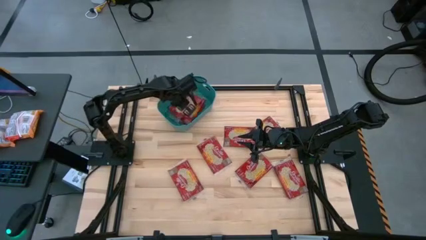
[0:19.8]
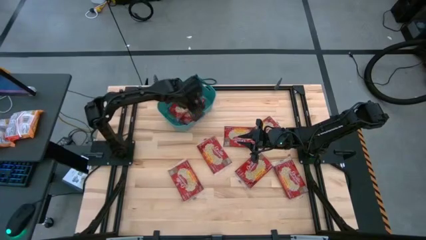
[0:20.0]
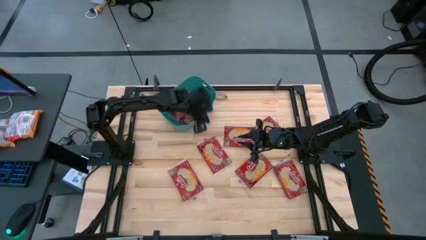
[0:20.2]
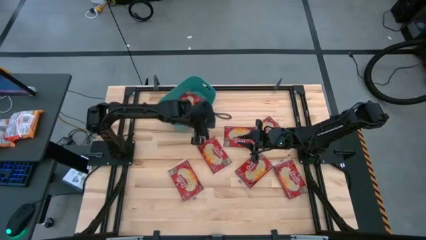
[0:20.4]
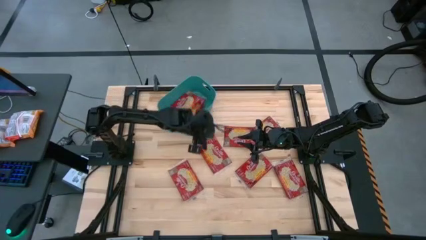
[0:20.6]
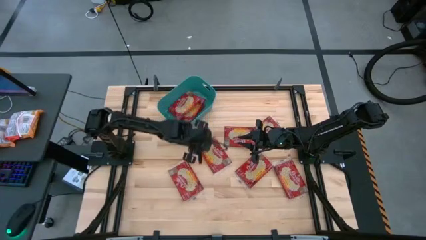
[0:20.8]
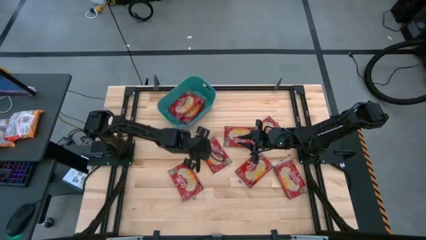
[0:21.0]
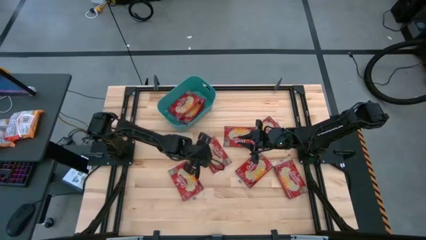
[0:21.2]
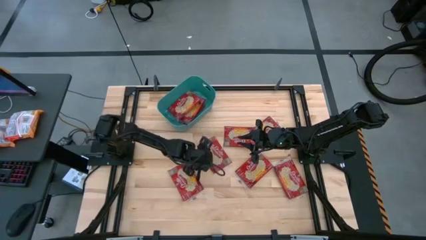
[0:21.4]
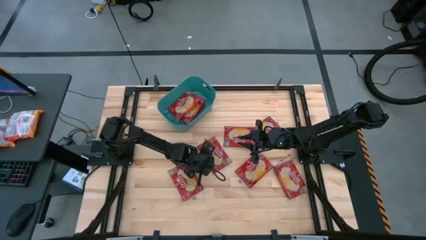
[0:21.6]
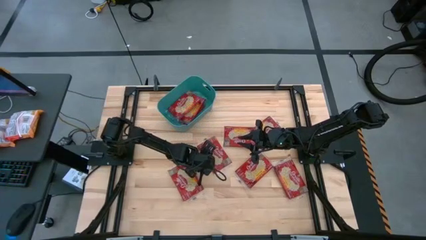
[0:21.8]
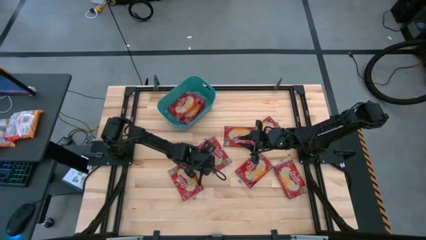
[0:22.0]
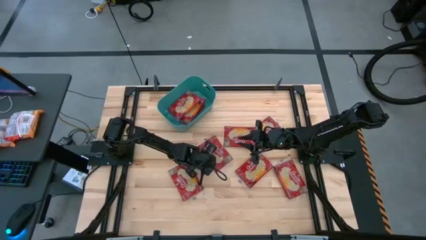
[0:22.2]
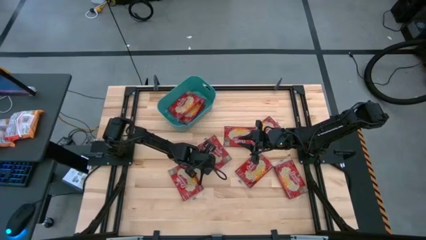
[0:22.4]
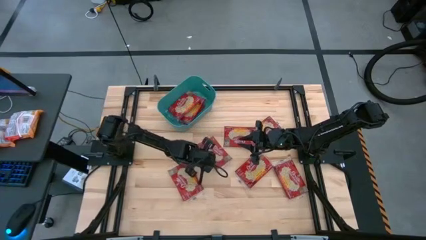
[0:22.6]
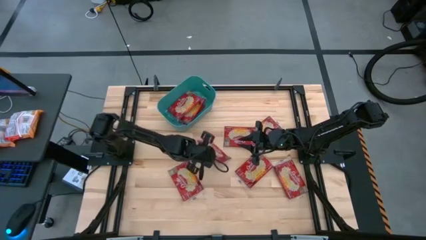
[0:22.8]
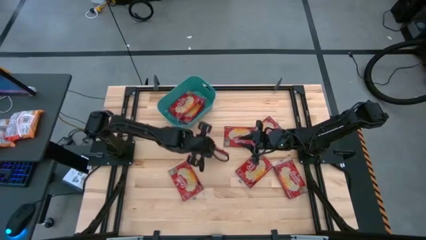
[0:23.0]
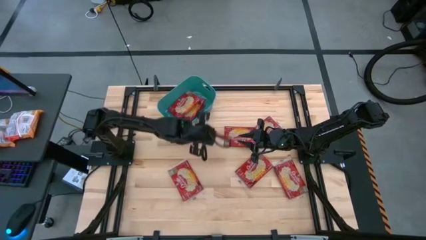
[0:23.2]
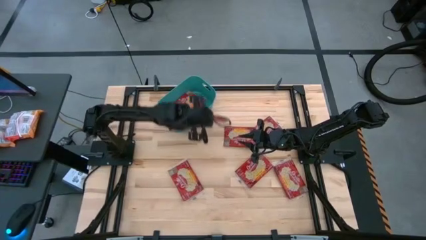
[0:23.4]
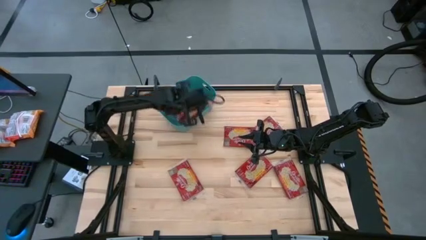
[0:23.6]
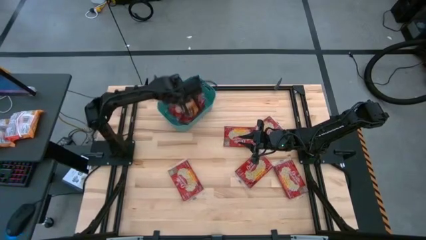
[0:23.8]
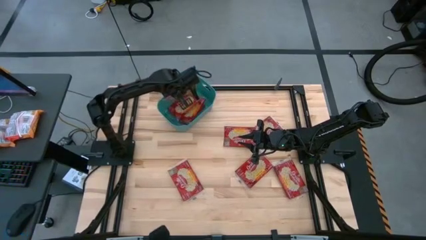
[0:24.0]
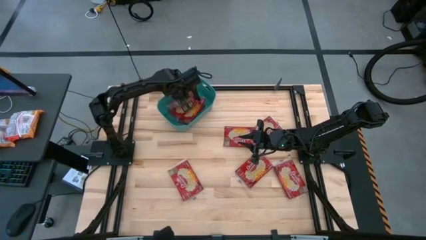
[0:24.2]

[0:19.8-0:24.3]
Task: Sort popcorn bags into baskets
Put the red popcorn bag into the green bin

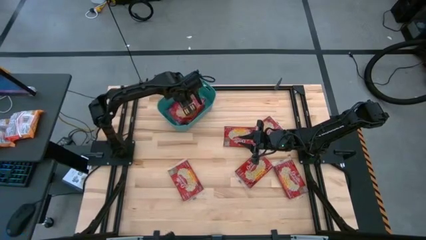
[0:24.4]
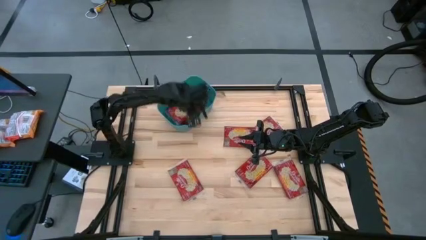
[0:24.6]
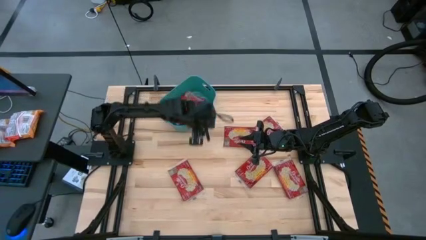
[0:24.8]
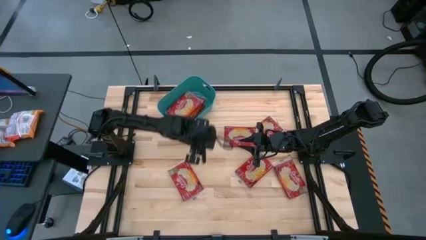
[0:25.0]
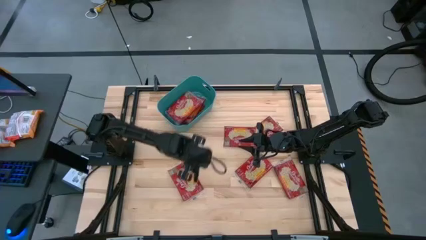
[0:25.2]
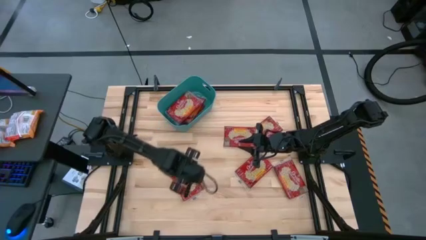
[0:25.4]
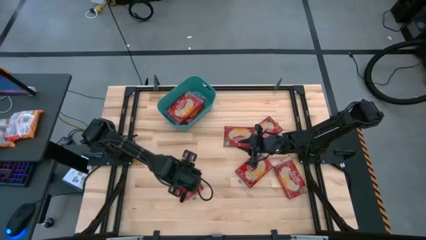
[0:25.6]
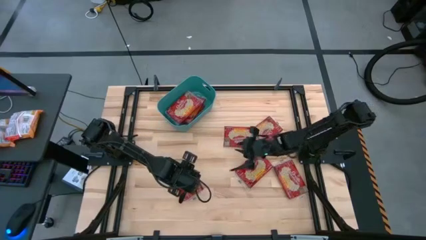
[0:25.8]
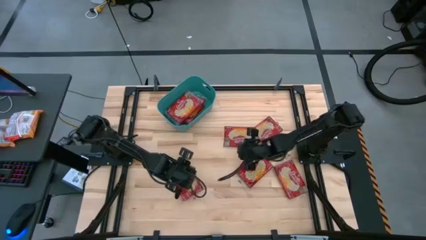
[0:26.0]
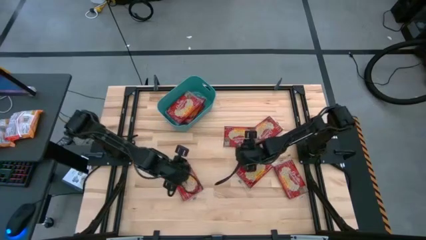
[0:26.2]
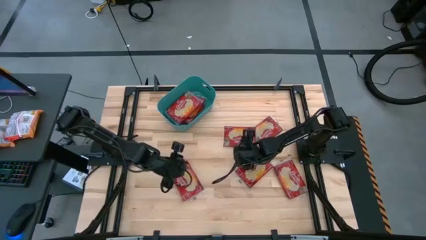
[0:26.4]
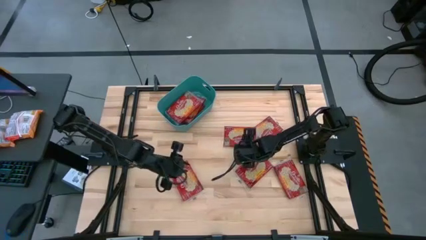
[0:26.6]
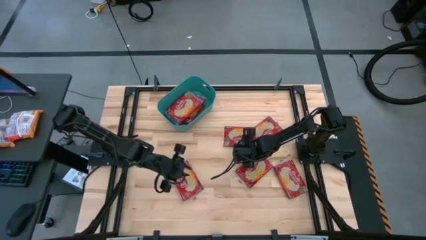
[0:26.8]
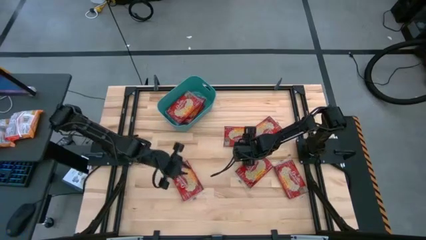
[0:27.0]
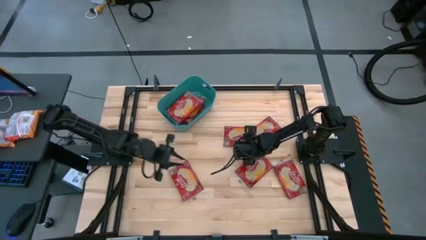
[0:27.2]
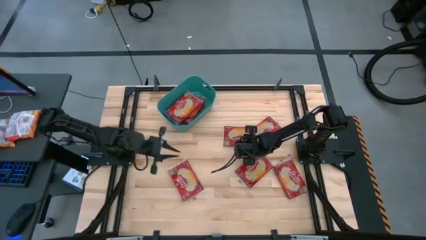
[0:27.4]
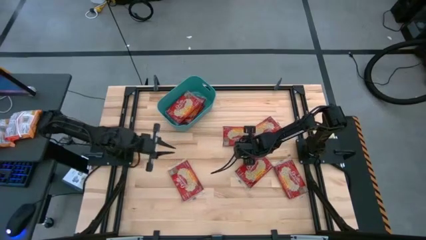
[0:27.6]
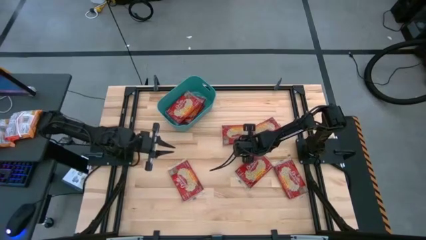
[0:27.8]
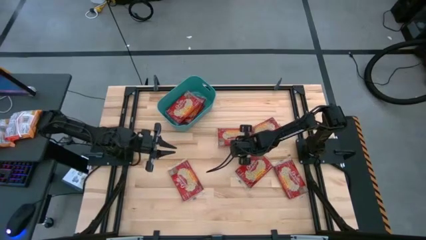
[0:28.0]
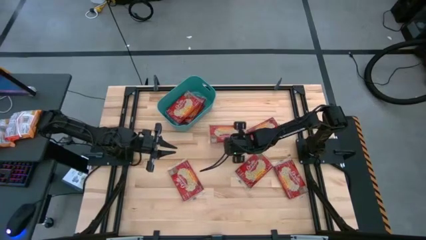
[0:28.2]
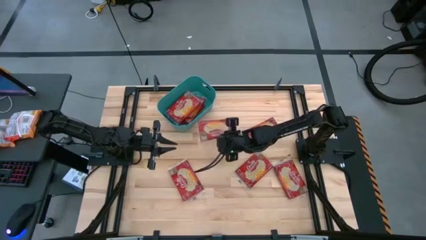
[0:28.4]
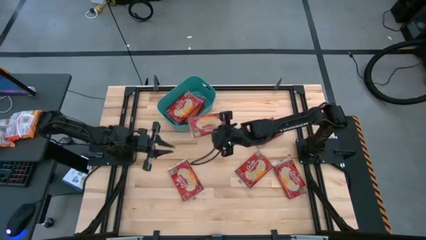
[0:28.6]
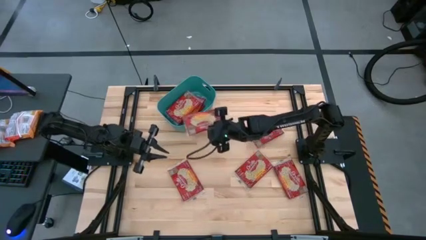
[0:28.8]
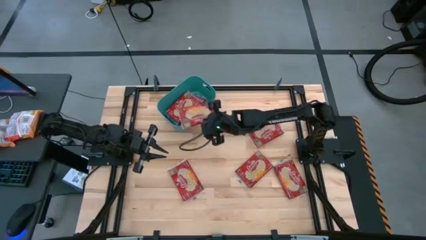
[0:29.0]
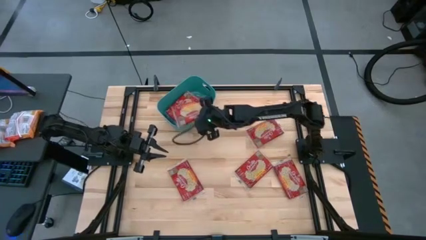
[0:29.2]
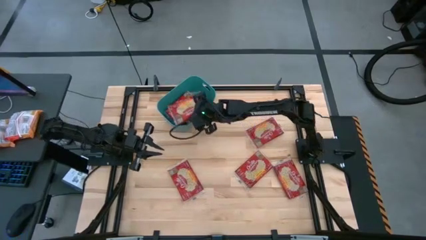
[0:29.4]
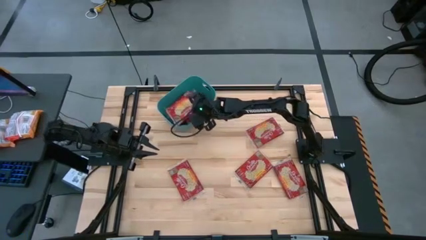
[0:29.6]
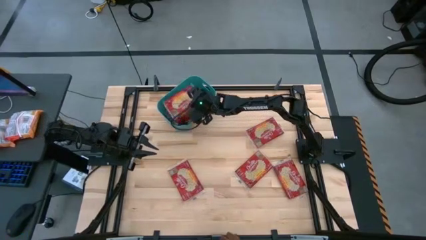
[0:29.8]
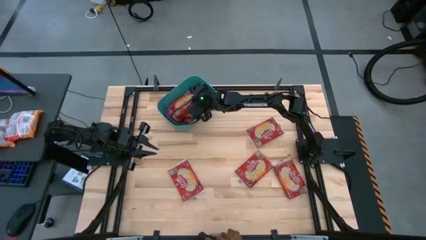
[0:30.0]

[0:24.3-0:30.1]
Put the red popcorn bag into the green bin

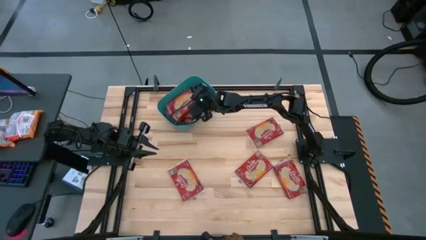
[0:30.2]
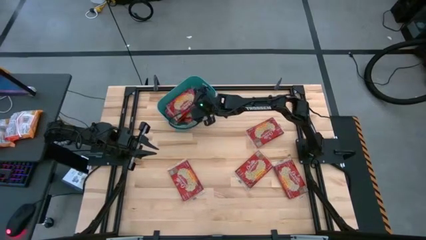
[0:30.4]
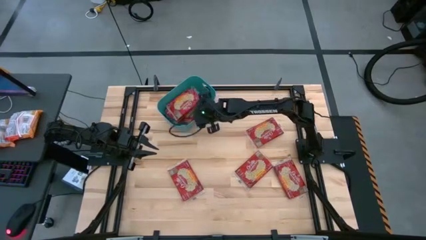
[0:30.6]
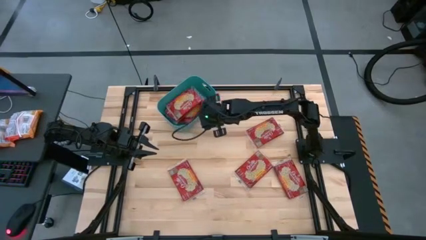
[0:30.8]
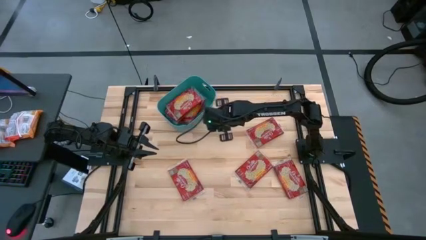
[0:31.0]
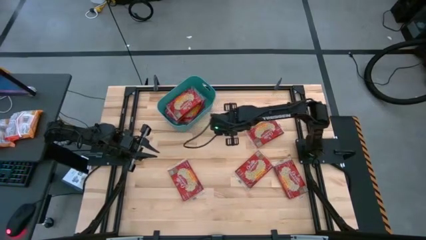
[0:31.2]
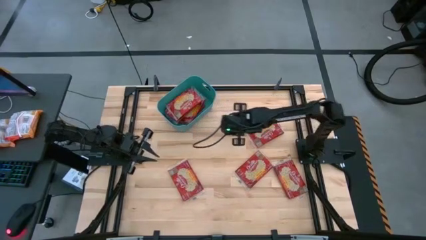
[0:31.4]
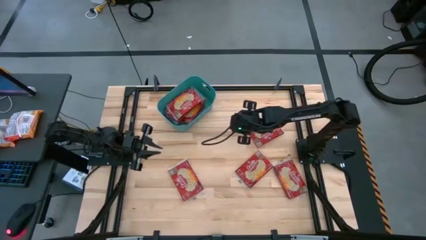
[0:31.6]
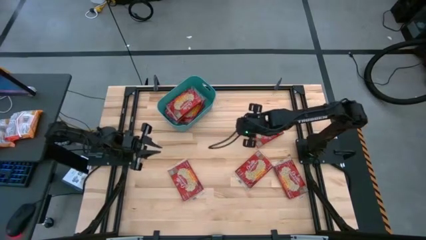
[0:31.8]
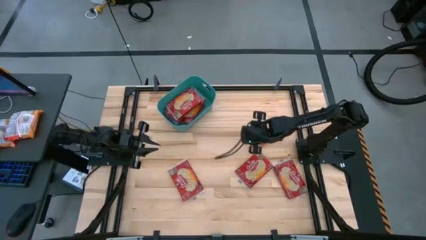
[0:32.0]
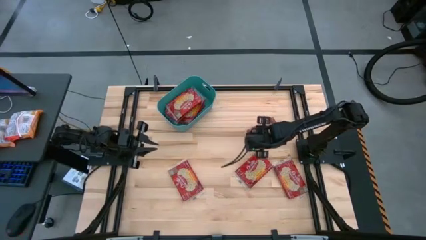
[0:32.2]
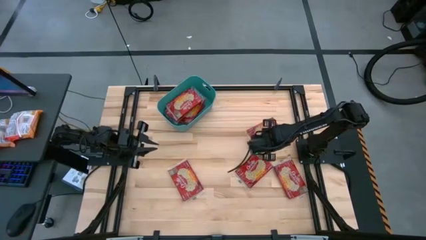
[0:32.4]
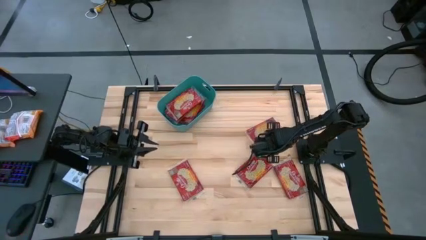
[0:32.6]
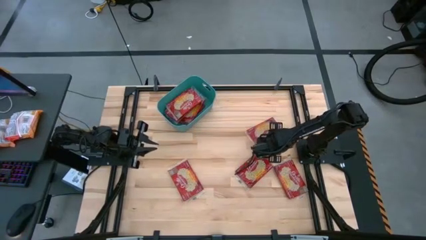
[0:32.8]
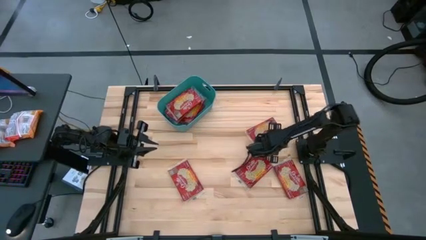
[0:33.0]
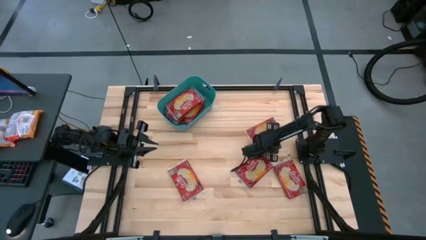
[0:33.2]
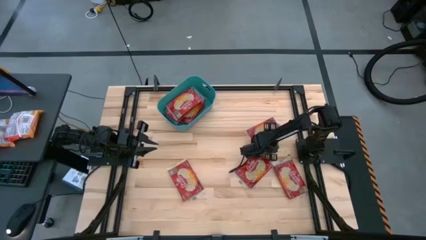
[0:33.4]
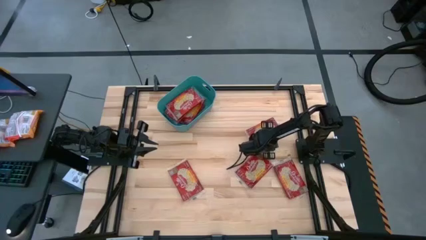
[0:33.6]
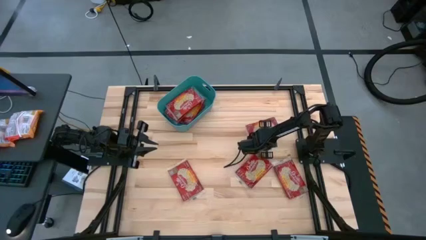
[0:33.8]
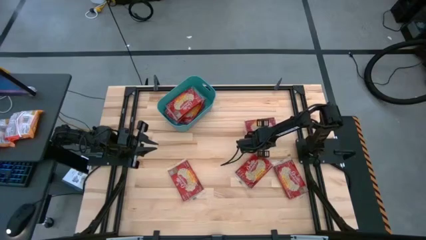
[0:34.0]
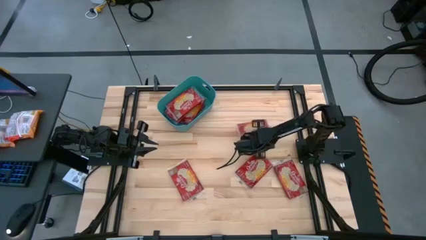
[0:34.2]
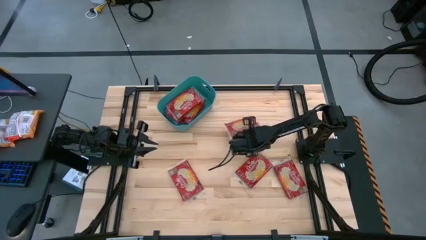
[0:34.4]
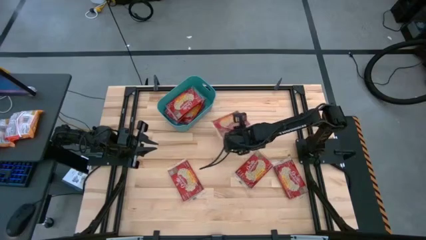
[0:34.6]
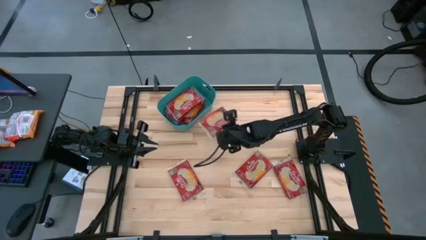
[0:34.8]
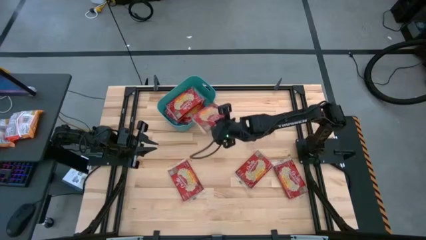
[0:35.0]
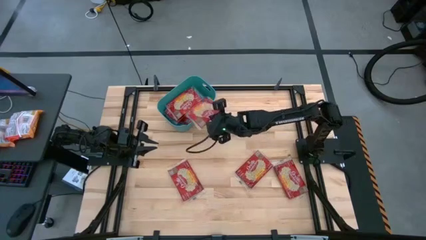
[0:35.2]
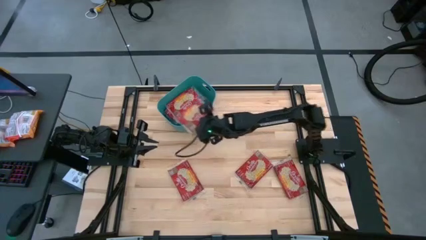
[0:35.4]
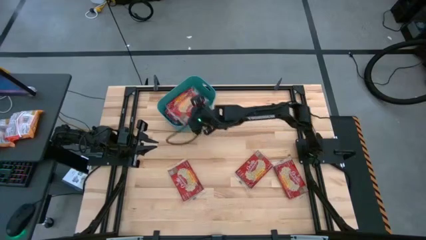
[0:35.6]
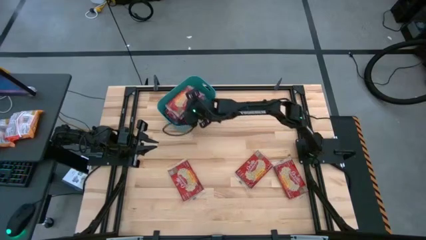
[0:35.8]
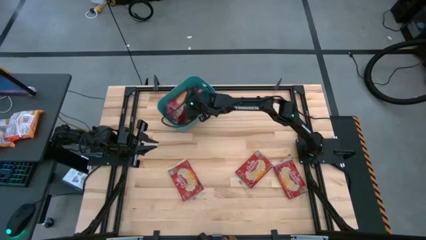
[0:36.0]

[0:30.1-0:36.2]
Put the red popcorn bag into the green bin

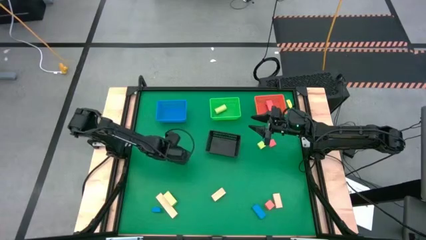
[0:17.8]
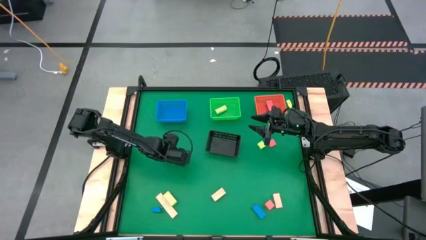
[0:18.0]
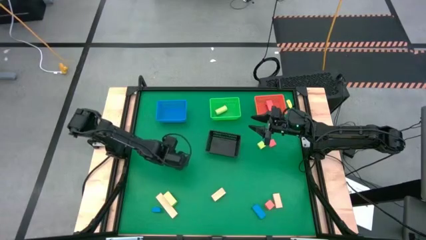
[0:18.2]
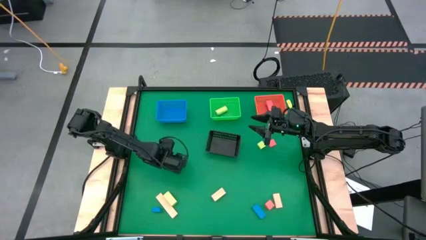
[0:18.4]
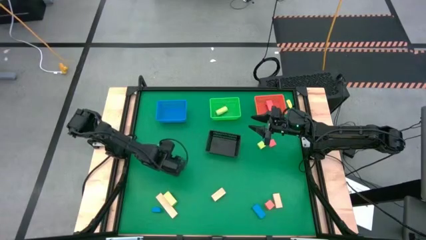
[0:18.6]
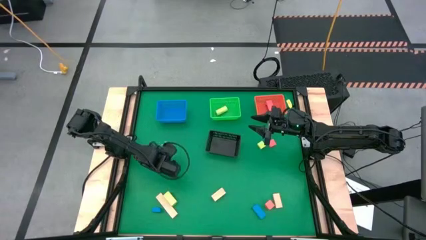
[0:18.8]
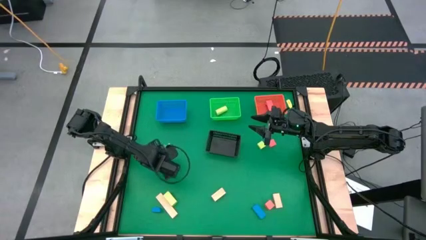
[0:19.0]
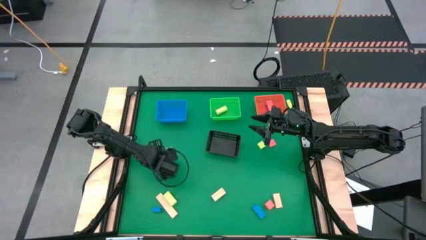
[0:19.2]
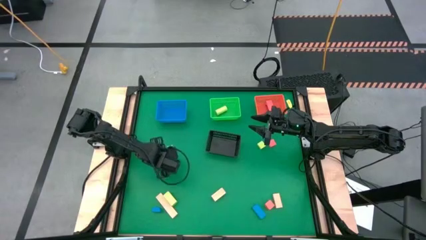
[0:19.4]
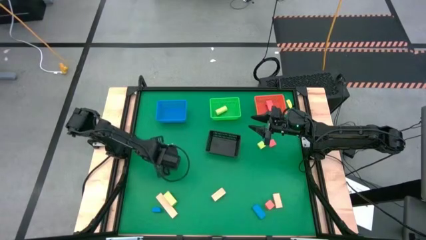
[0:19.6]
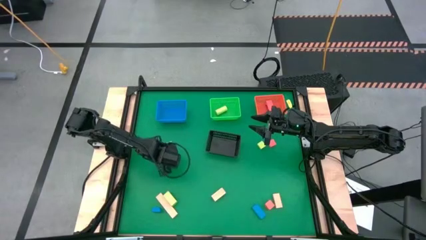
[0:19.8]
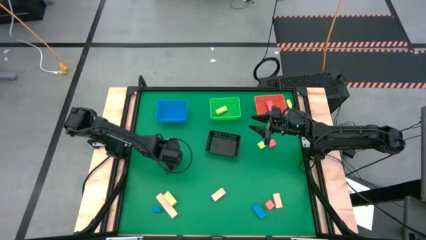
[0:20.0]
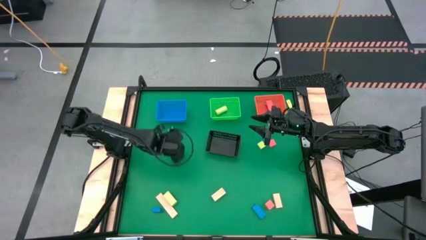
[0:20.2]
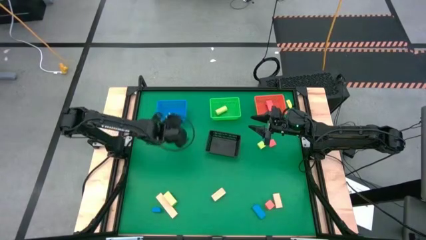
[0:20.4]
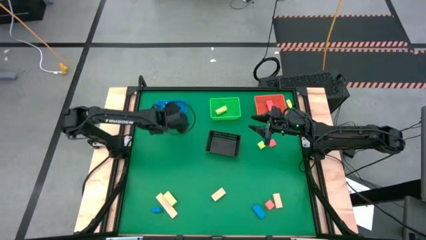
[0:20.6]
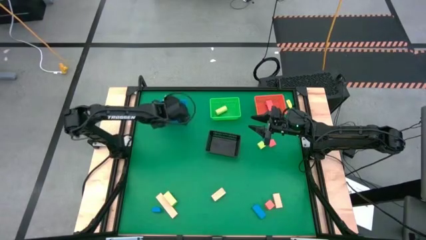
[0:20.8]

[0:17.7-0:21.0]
Task: Sort & place blocks by color
Put the top blue block into the blue bin
